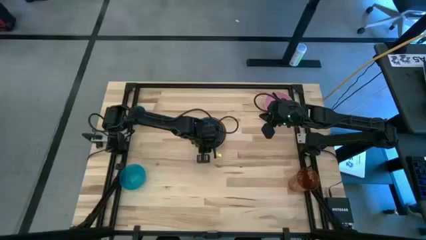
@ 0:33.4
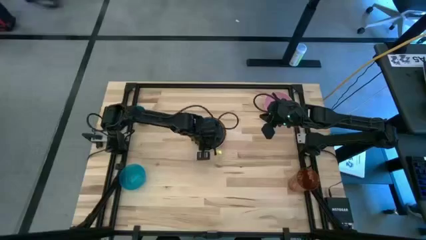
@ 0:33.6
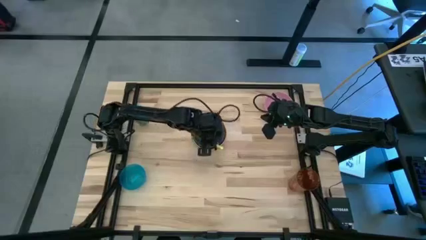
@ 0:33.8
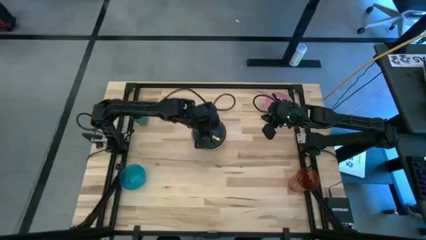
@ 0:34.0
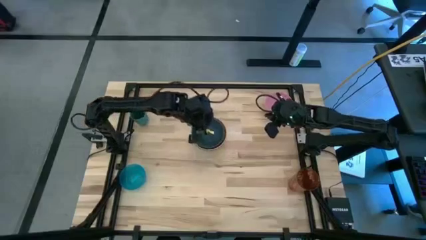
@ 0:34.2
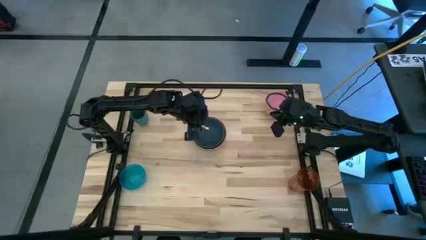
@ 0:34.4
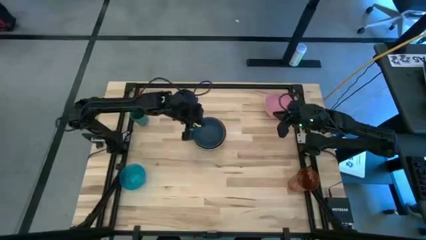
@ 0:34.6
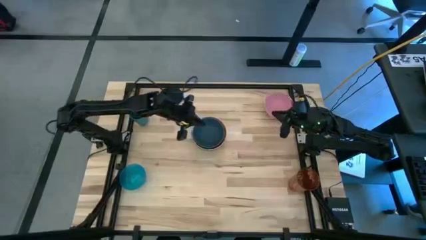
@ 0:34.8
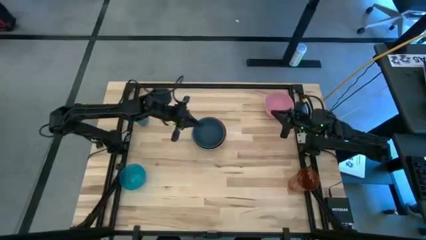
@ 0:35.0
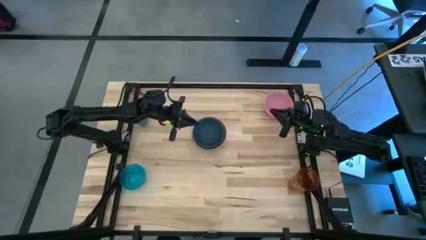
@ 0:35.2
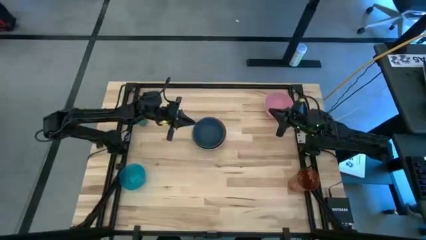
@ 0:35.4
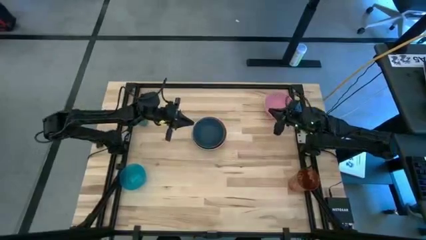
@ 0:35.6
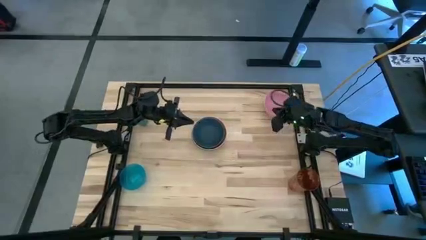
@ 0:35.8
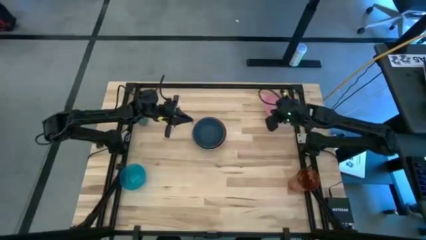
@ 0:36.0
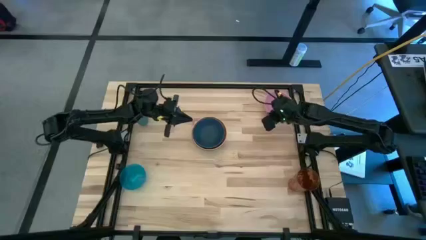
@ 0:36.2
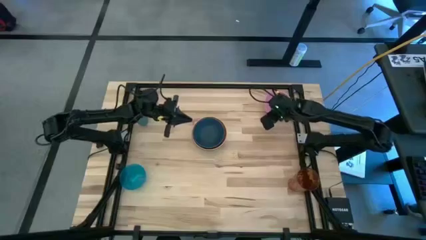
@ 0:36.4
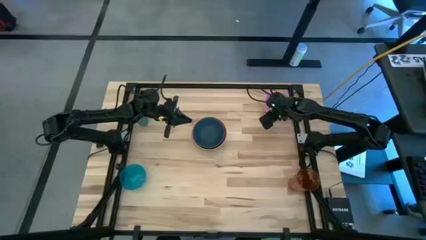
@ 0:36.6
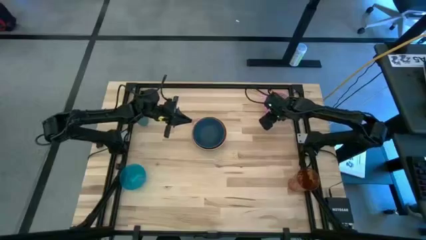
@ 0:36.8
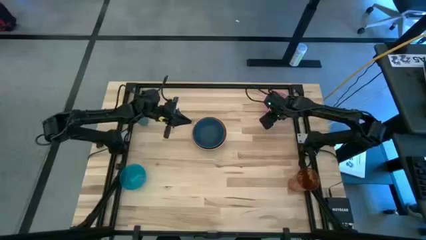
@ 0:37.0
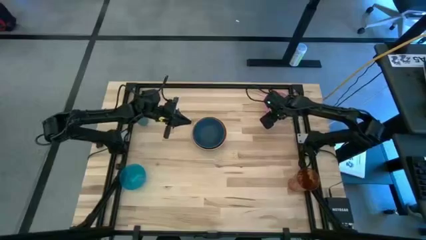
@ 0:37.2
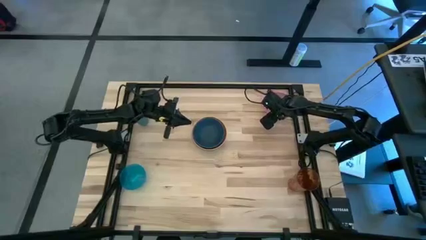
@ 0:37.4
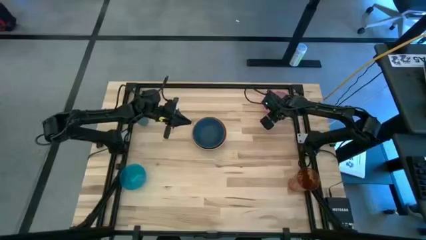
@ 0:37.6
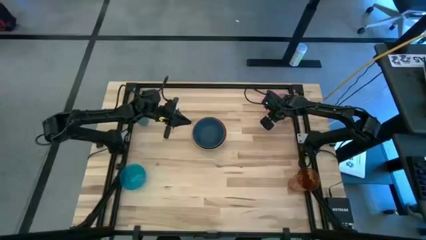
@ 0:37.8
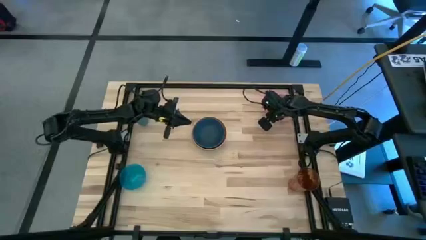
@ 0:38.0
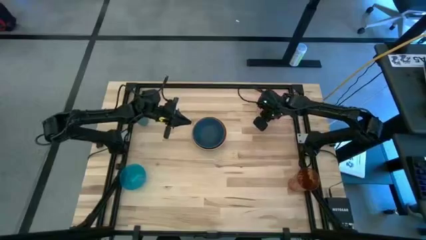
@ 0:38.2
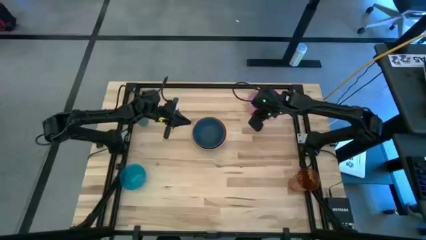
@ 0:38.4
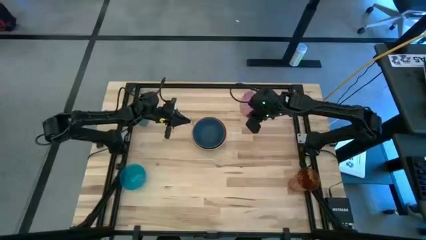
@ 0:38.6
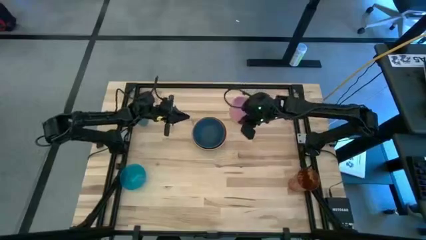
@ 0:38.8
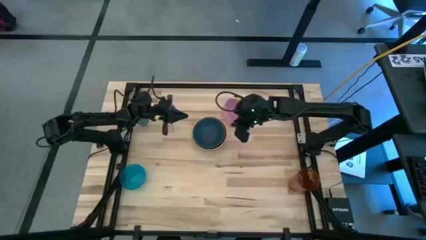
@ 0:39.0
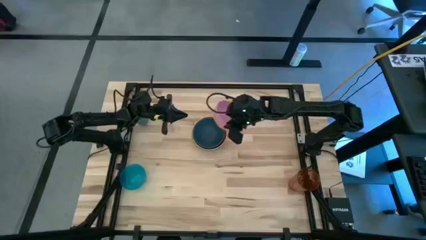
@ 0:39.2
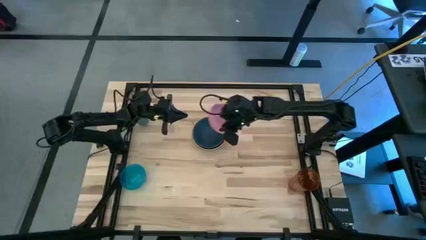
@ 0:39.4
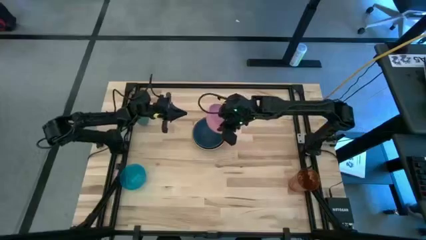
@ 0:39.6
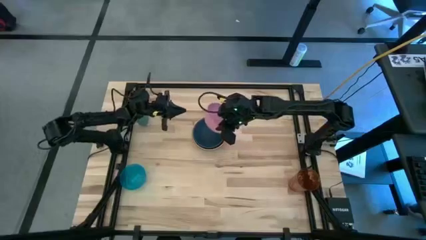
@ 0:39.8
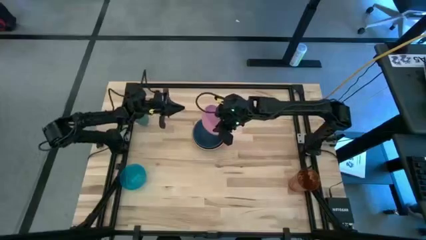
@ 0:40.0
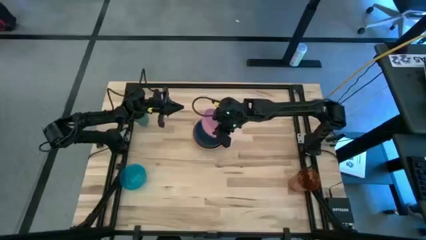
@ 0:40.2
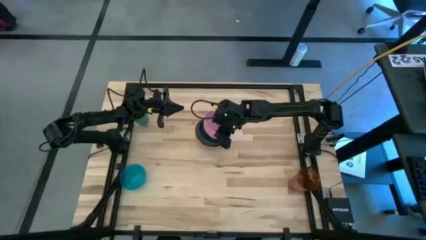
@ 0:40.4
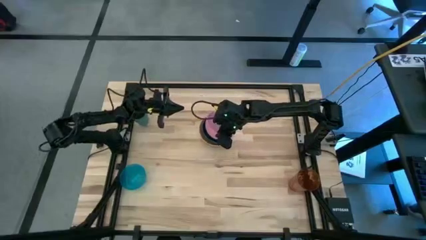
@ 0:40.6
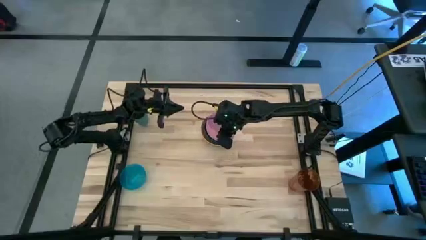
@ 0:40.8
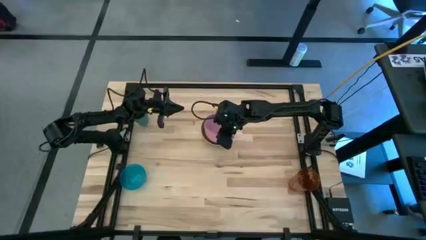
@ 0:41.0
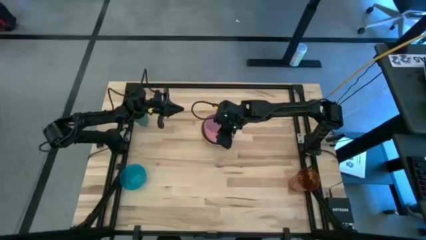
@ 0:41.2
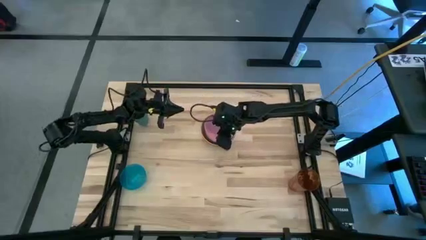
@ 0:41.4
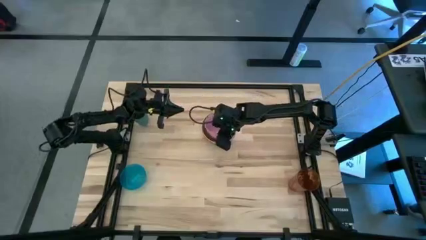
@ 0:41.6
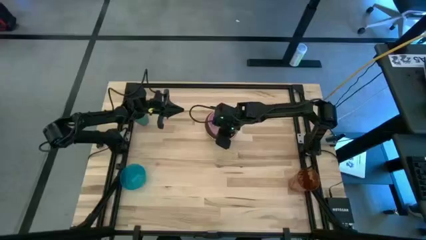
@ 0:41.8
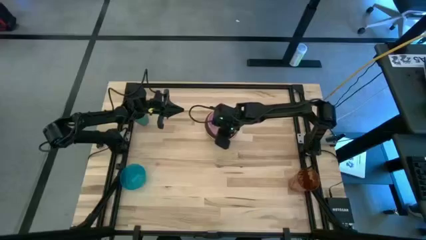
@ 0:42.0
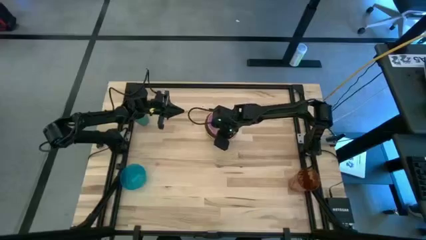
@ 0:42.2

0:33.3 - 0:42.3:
Stack the pink bowl on top of the blue bowl
